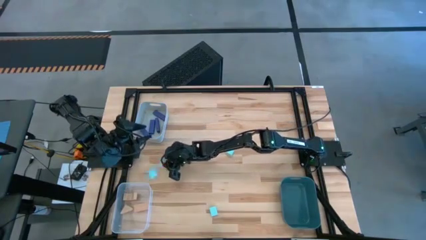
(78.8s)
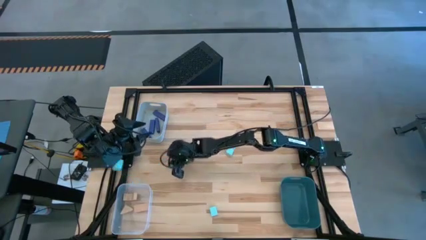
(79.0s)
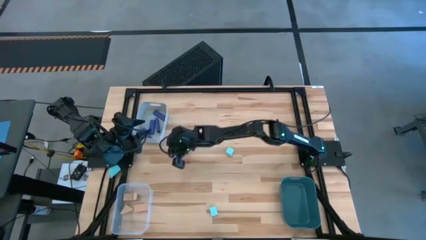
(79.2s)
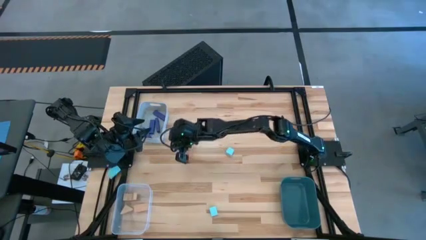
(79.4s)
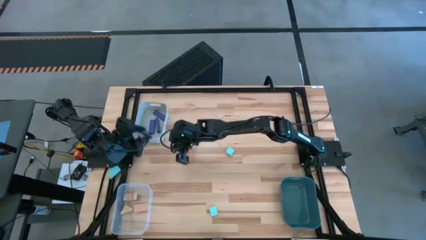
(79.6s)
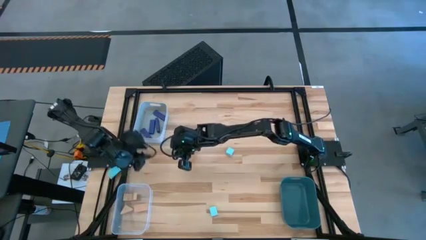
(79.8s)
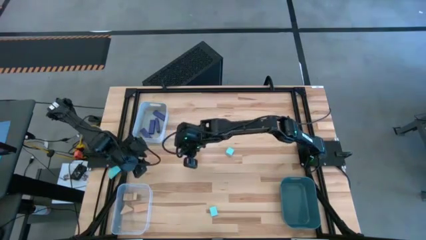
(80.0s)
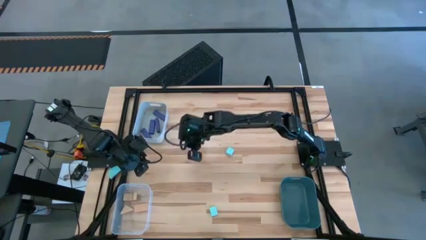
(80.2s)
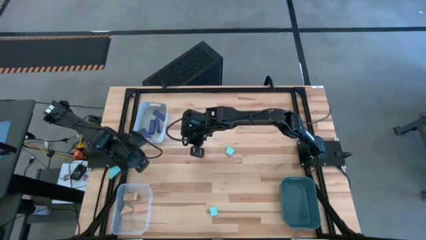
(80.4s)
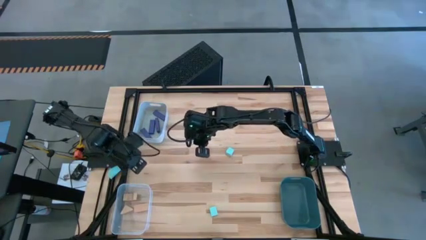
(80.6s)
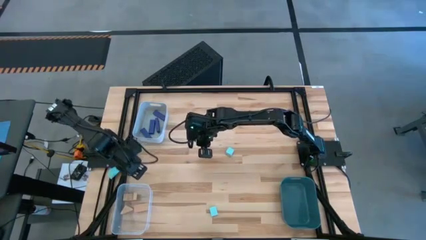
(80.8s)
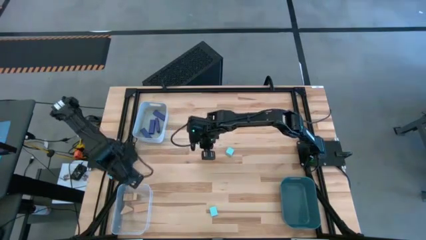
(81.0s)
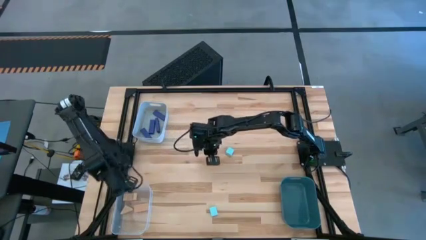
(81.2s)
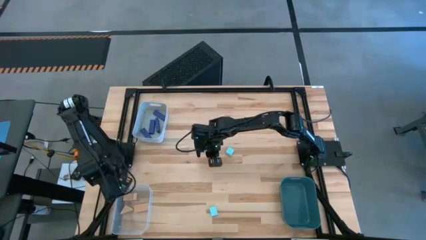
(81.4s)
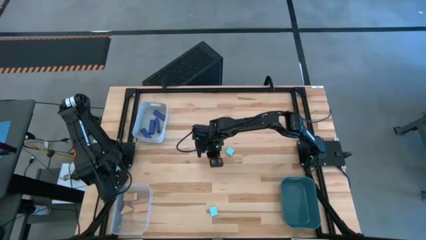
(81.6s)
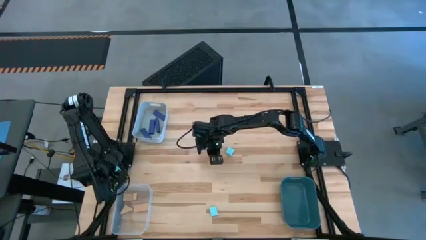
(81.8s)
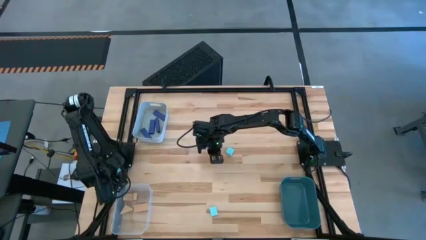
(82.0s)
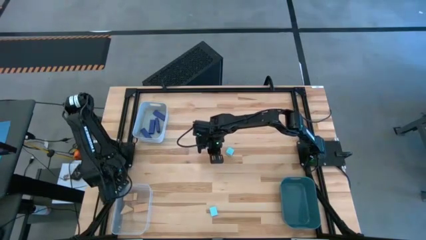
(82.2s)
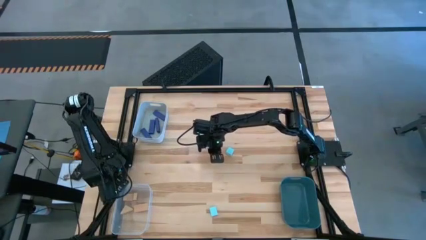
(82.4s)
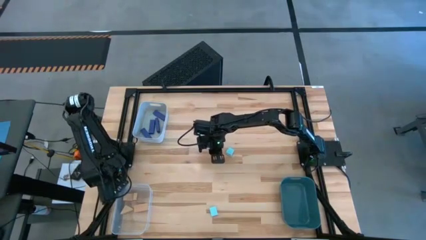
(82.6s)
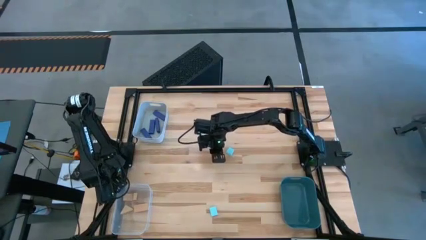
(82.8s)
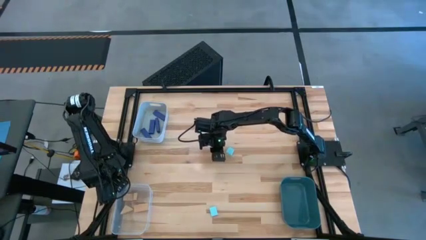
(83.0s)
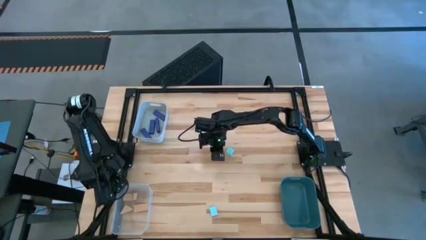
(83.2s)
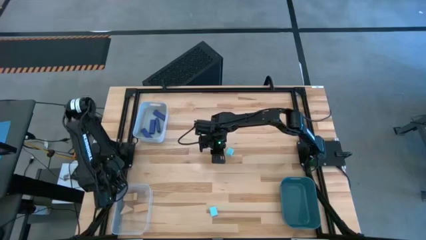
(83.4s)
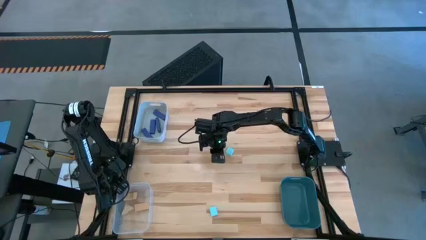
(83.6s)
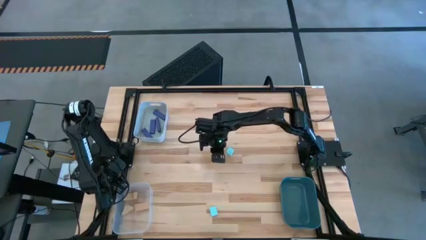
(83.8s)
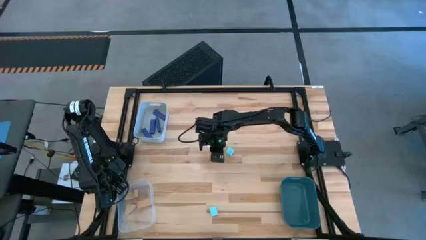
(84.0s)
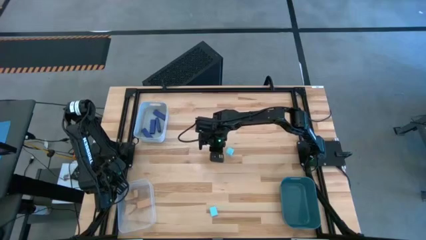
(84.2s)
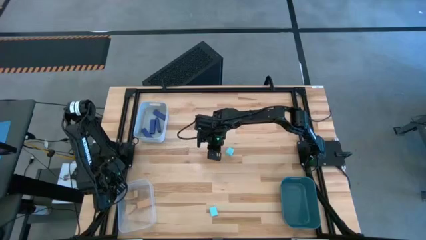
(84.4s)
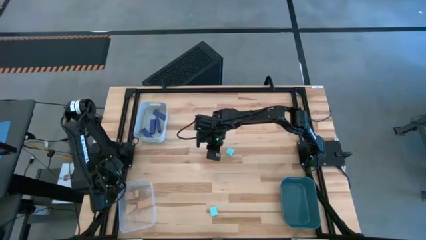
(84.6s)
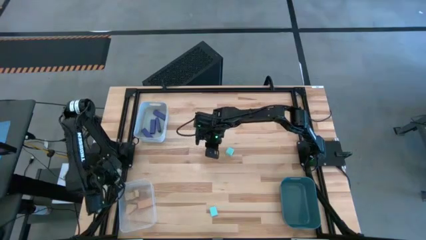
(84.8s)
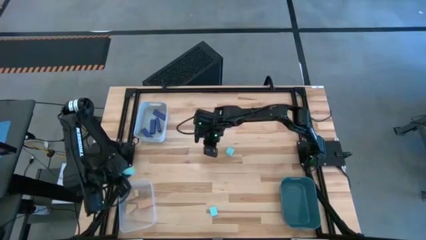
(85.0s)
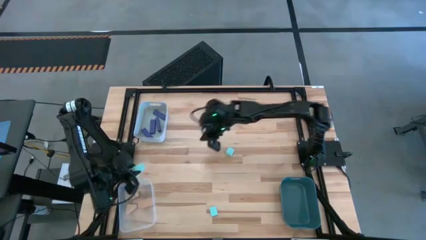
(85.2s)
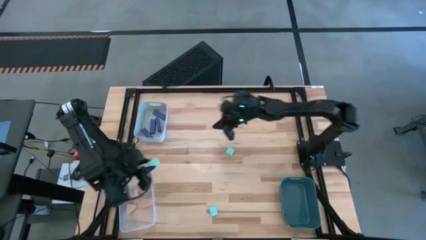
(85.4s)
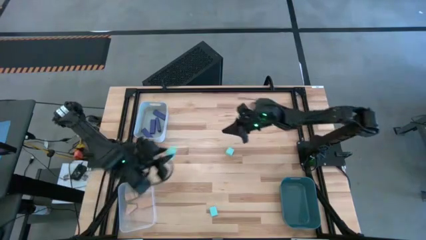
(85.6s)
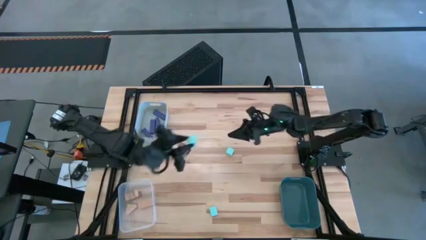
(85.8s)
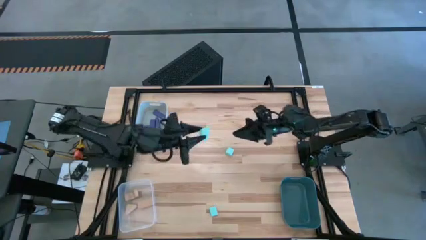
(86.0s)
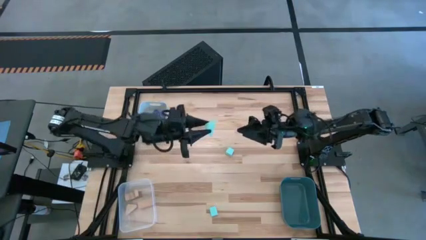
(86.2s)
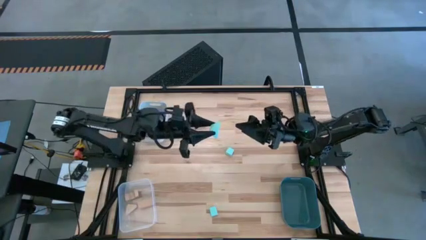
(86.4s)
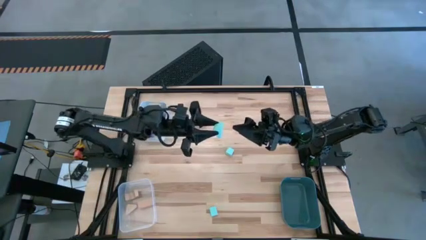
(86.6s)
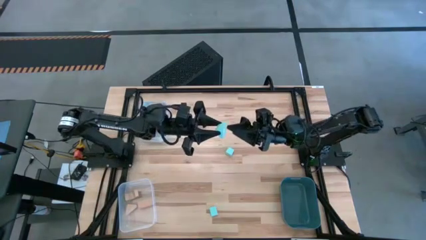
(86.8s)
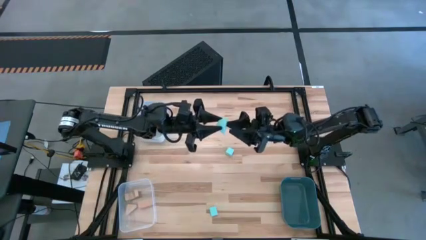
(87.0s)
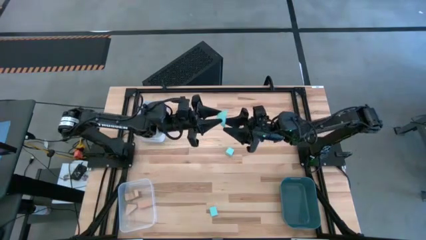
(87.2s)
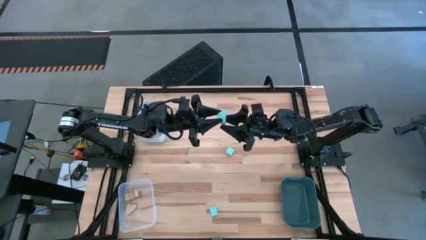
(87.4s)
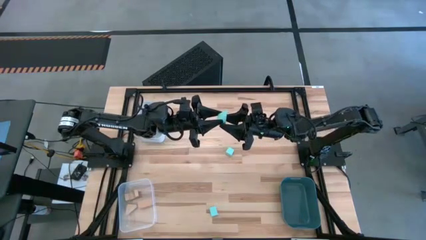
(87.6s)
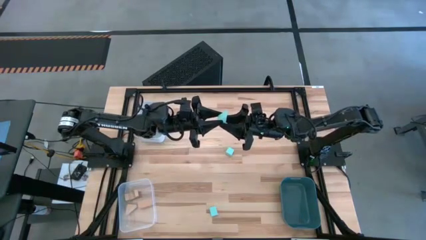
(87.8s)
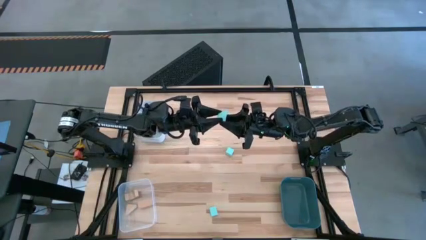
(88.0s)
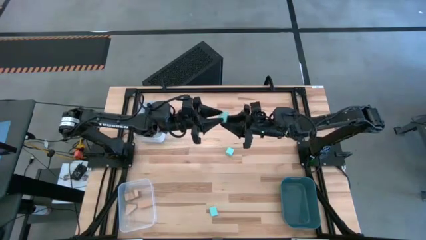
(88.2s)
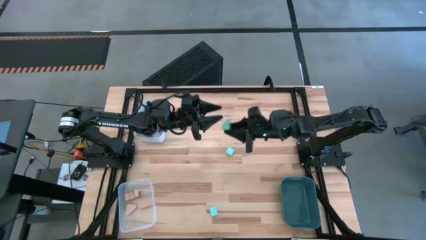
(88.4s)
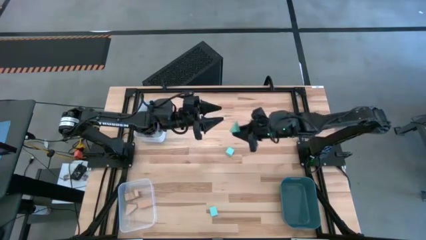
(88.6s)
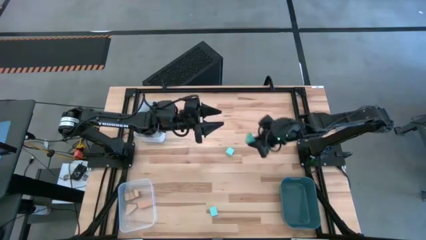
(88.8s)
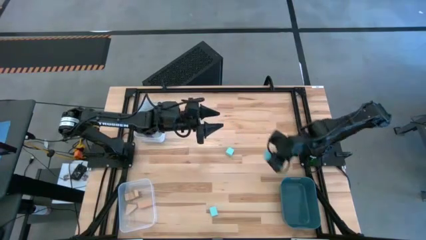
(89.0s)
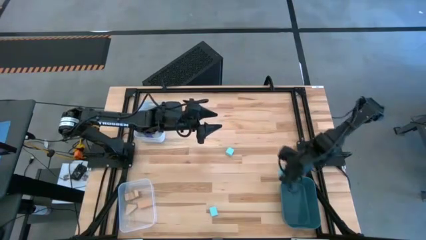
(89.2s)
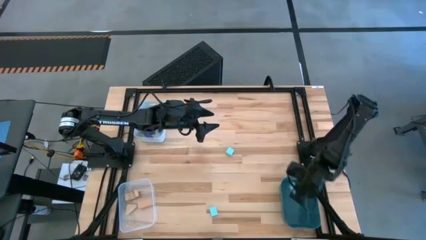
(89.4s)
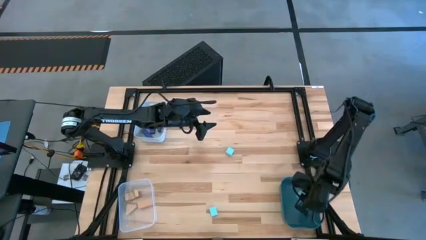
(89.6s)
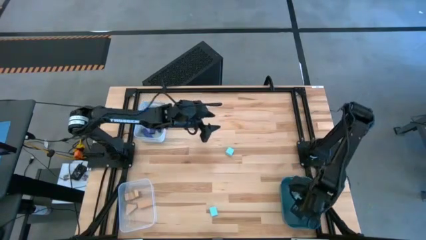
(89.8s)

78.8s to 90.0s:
Task: Sort & place blocks by color
Put the blue block into the blue bin

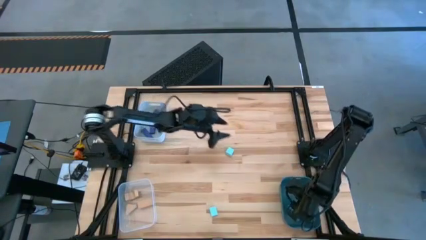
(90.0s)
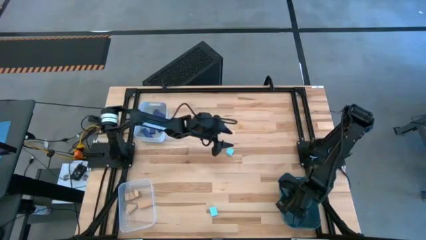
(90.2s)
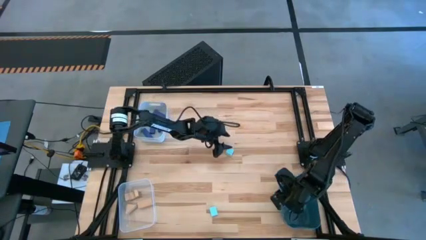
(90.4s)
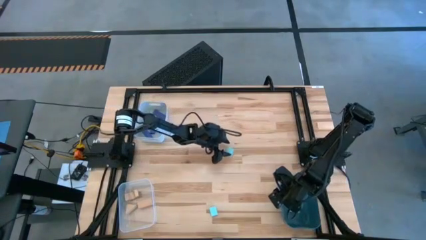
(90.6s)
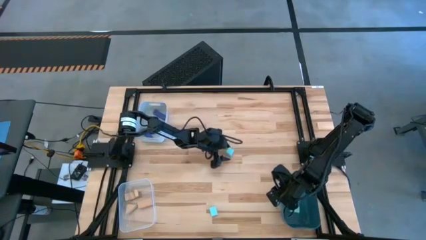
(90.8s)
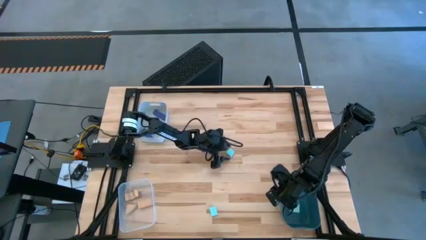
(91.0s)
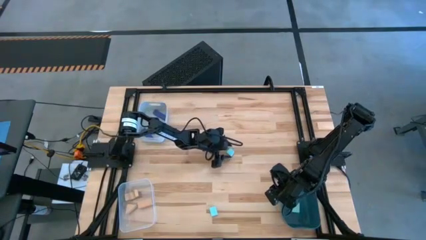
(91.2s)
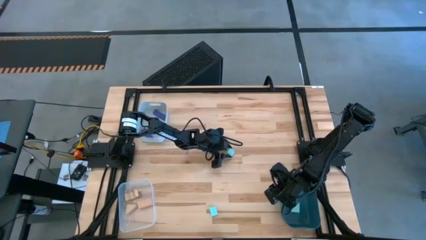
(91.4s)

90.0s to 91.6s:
Put the blue block into the blue bin

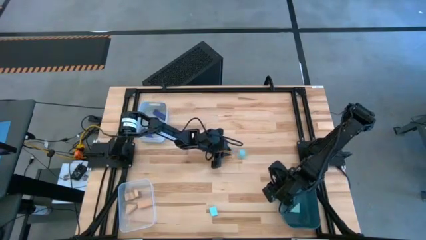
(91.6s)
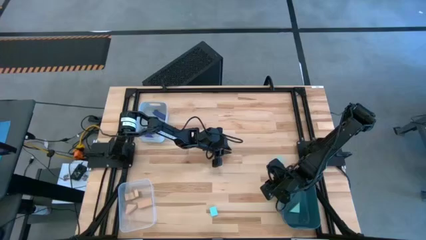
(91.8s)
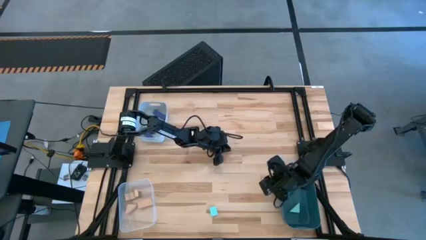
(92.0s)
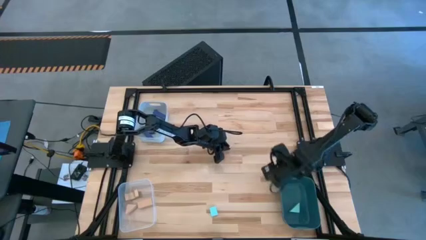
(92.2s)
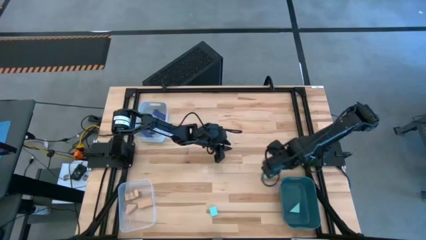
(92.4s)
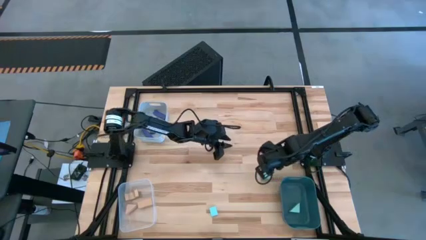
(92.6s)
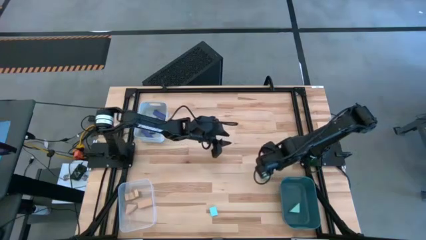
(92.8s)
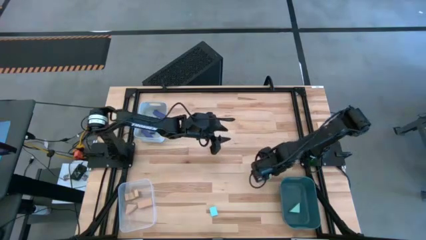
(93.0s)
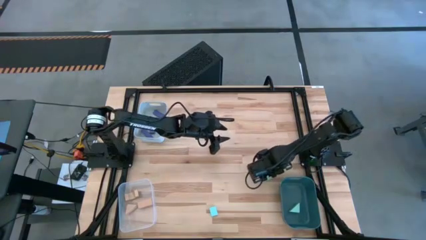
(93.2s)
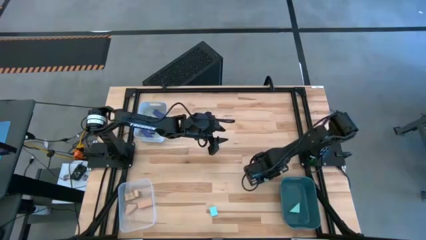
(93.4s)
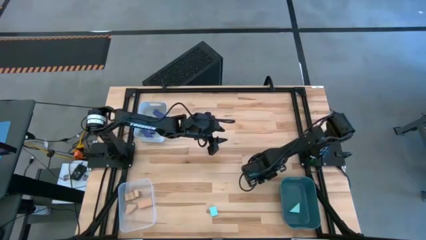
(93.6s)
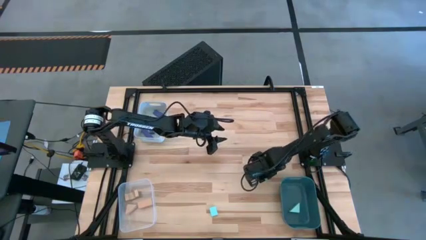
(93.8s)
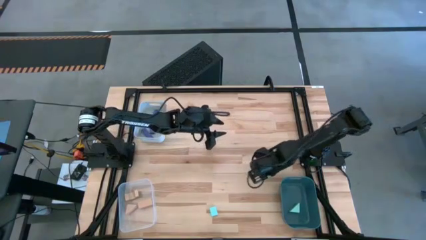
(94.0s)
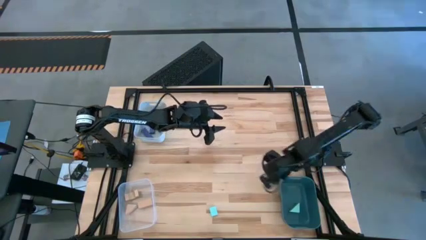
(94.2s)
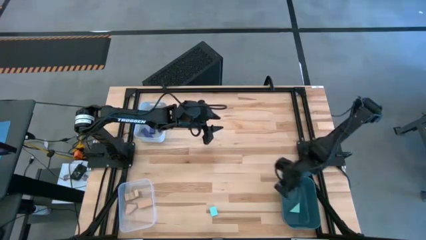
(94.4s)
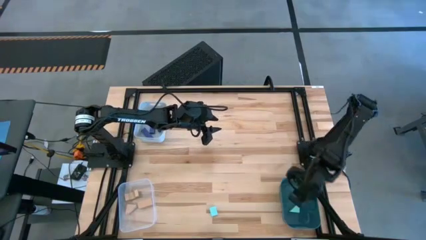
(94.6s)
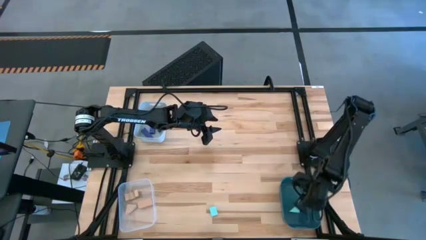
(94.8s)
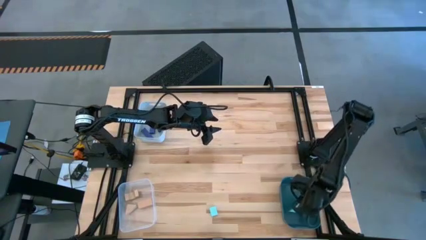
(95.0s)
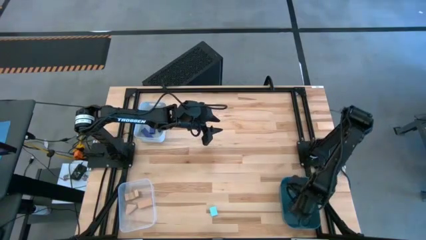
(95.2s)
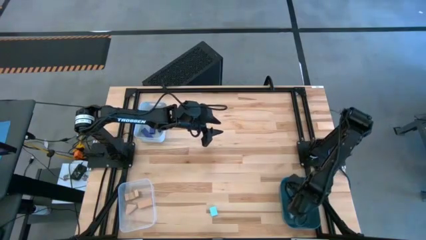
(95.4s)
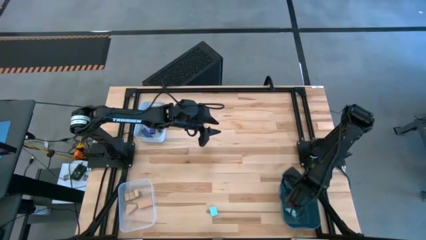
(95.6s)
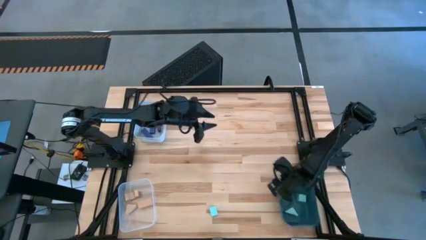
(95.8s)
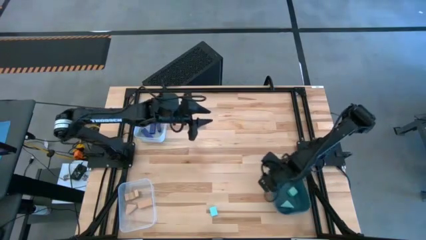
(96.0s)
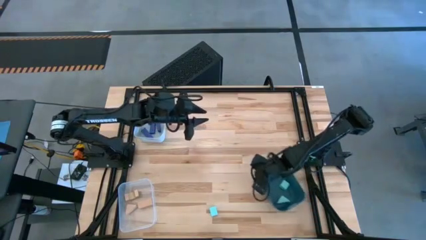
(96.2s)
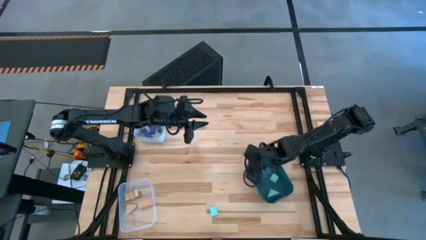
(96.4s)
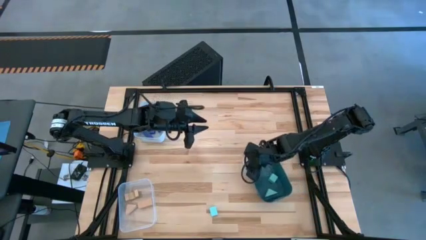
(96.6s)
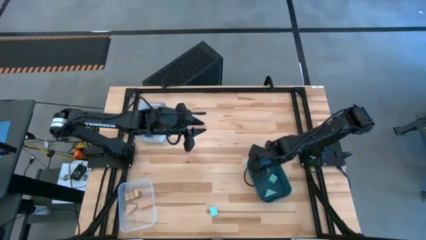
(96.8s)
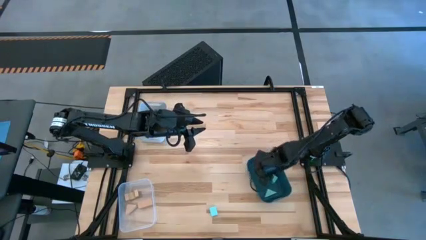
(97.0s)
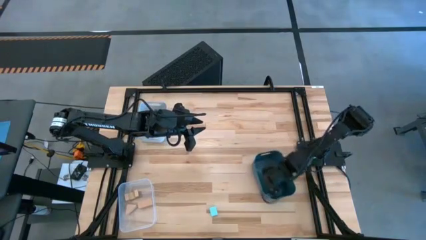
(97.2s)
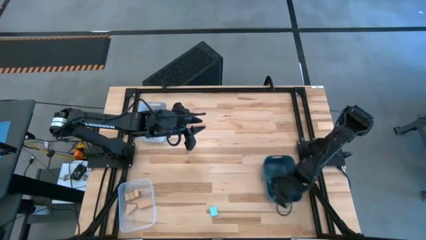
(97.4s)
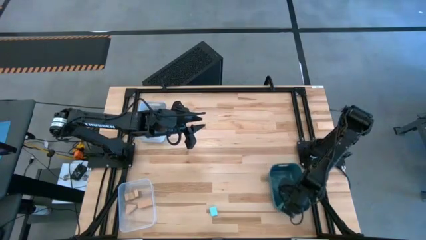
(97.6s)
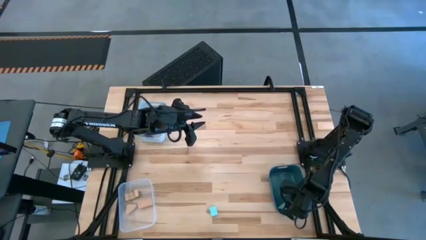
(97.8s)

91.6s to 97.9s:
Put the blue block into the blue bin
